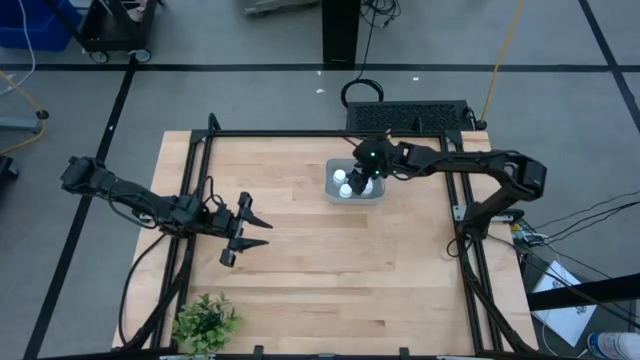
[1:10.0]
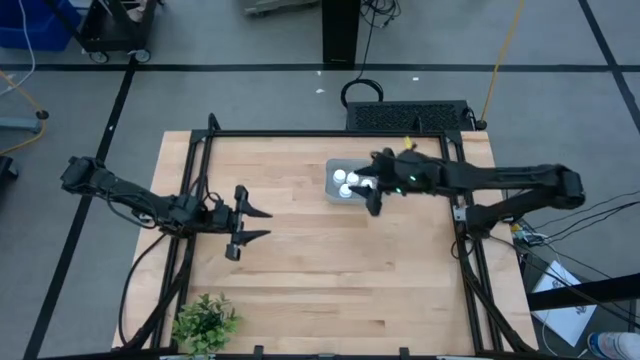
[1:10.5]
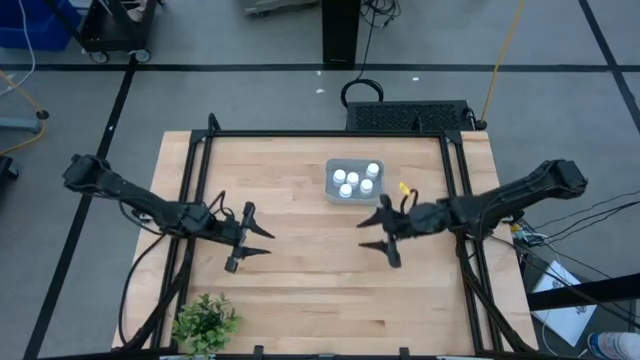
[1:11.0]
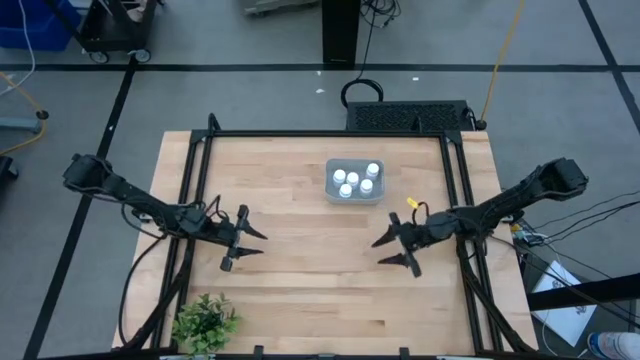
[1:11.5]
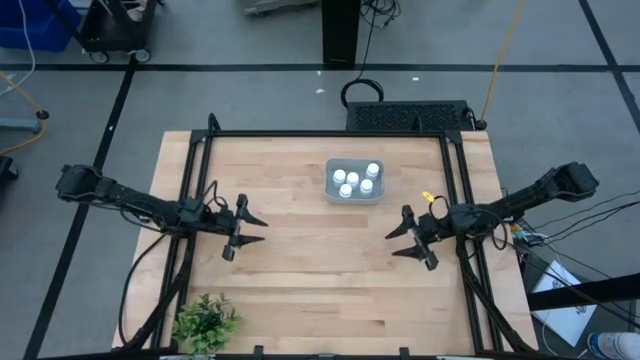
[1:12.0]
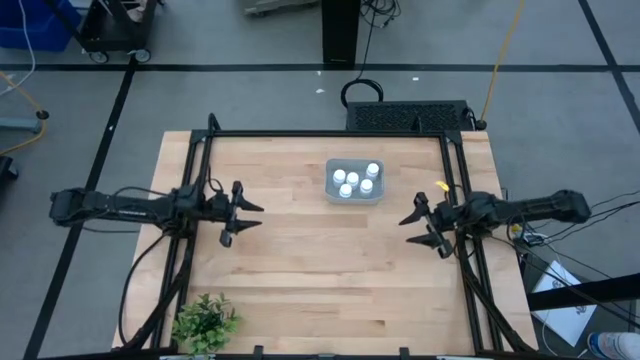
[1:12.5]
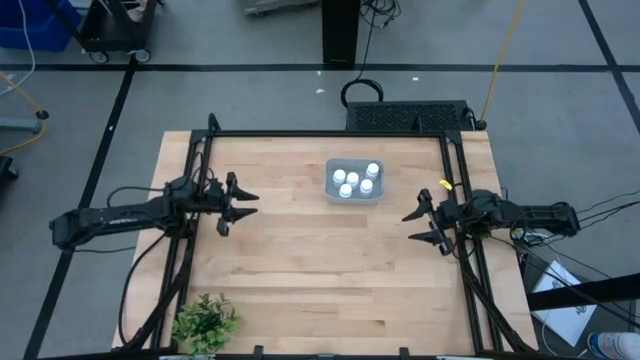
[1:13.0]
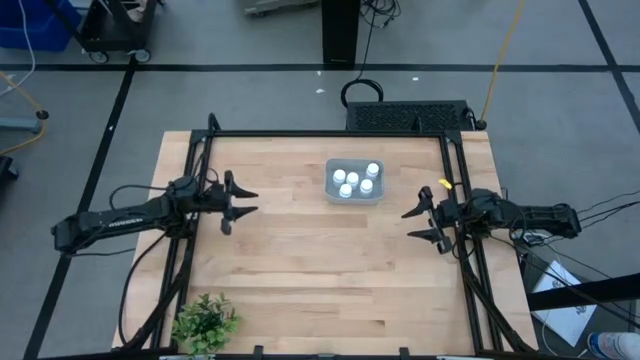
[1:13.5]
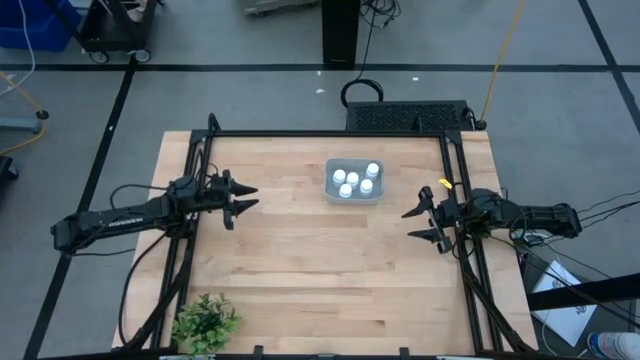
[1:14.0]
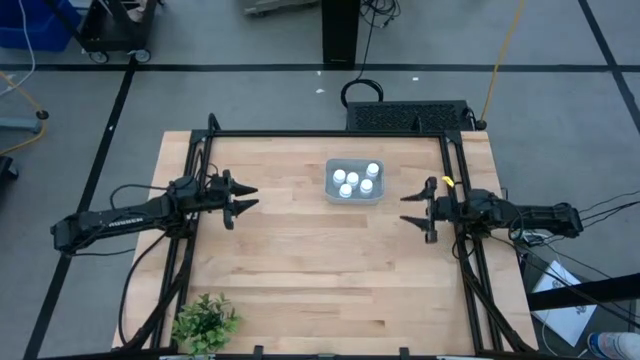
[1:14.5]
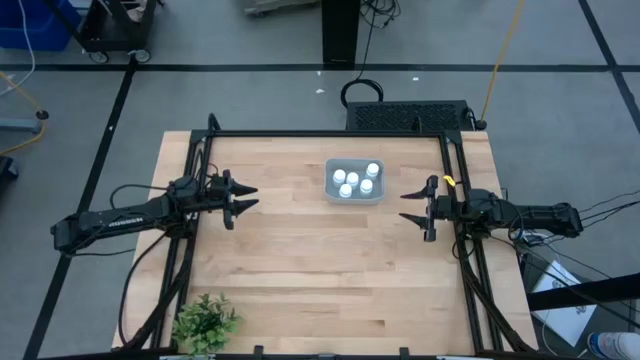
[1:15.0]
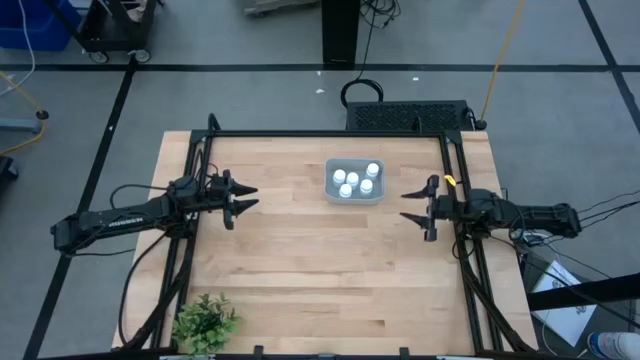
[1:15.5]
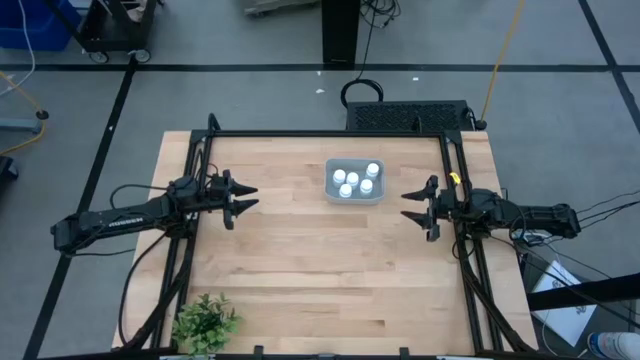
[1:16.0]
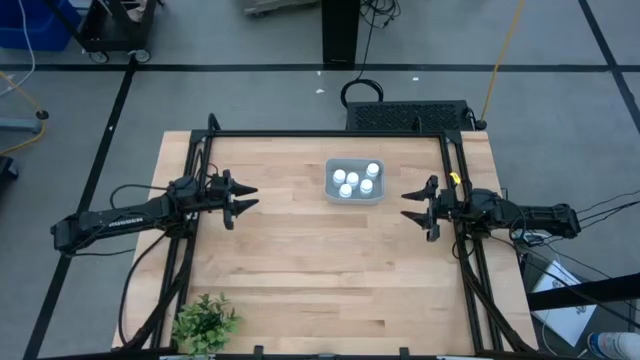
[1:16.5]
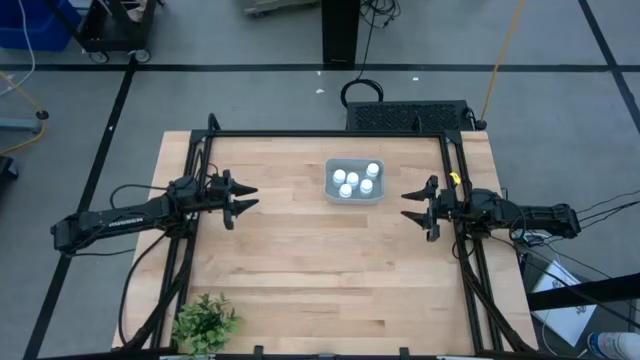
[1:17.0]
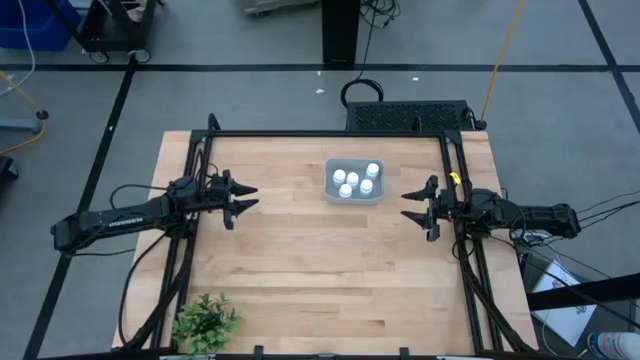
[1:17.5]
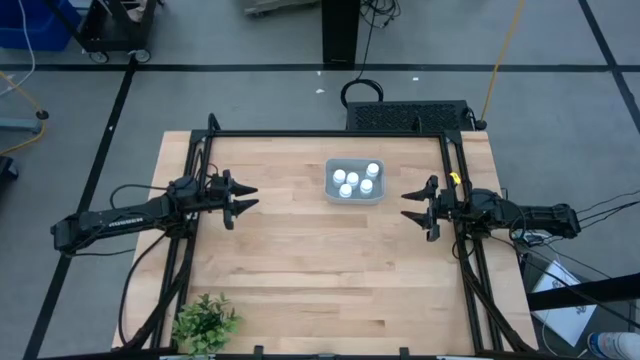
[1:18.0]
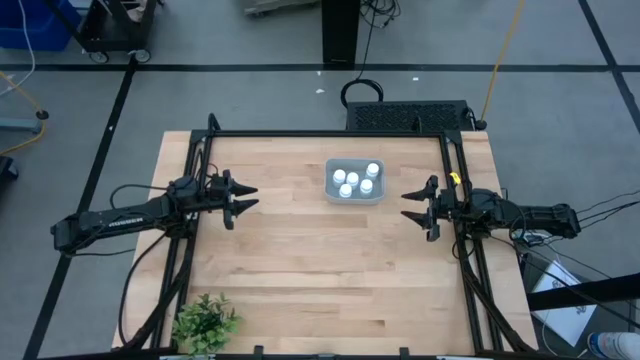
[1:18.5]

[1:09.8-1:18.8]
Task: Pick and place pill bottles into a basket
Return to Home Position

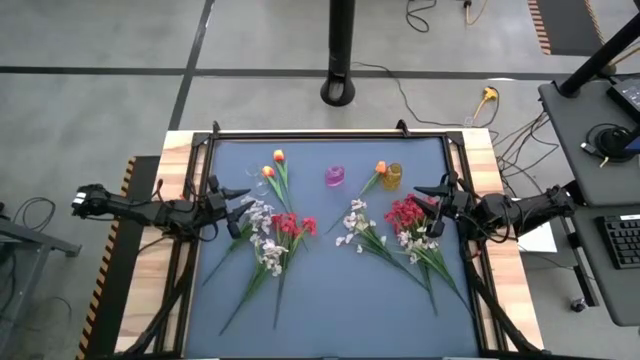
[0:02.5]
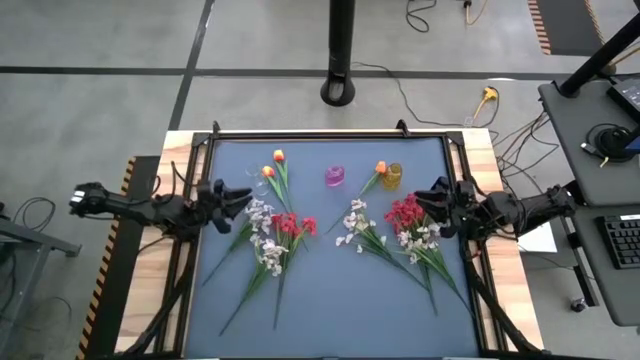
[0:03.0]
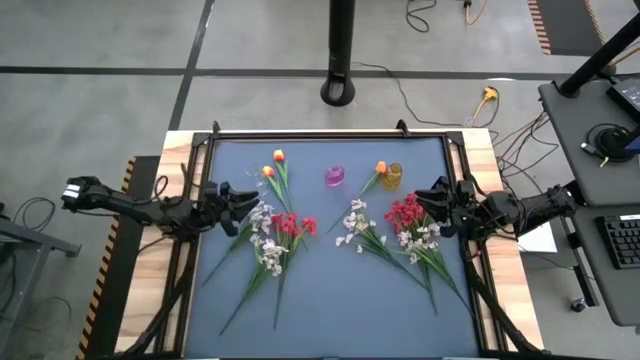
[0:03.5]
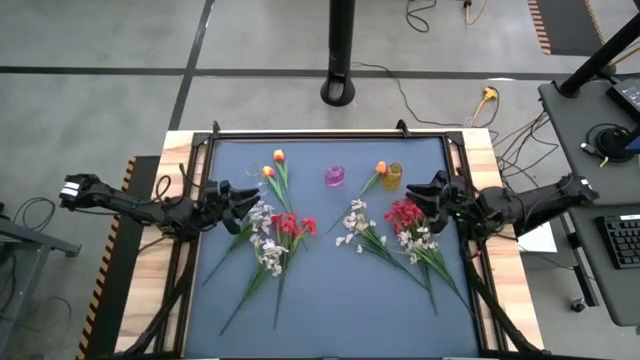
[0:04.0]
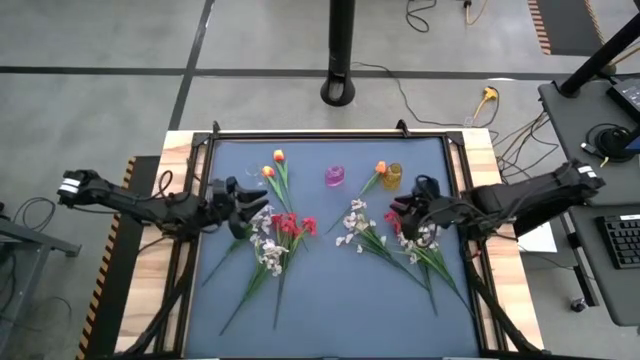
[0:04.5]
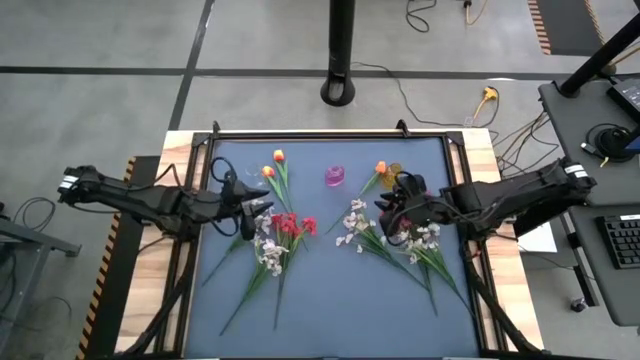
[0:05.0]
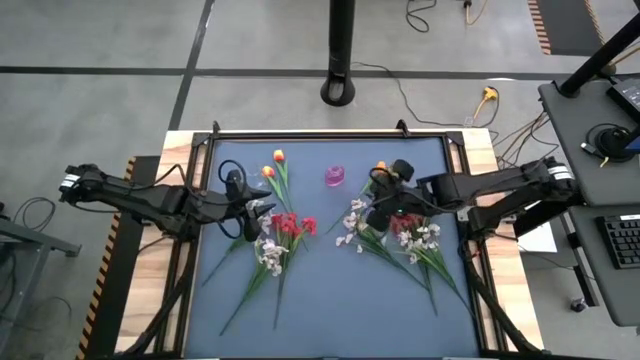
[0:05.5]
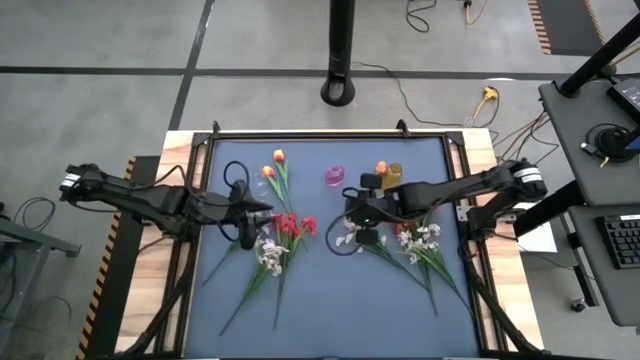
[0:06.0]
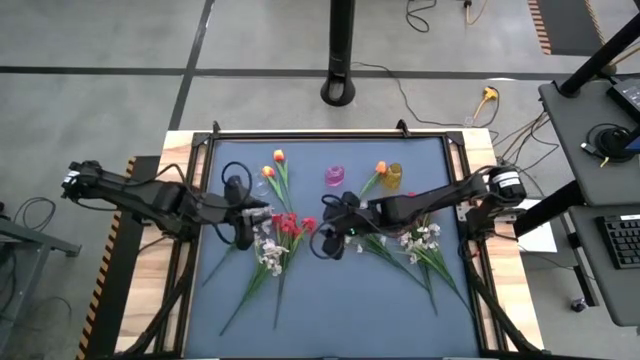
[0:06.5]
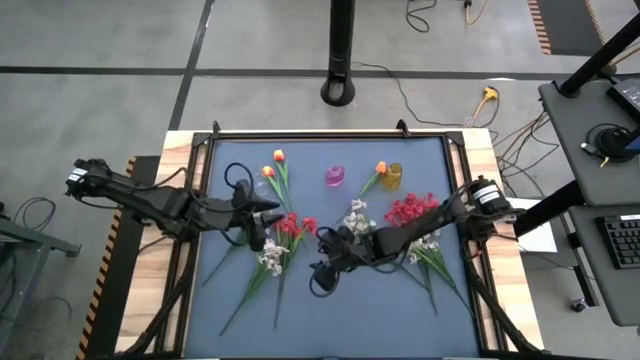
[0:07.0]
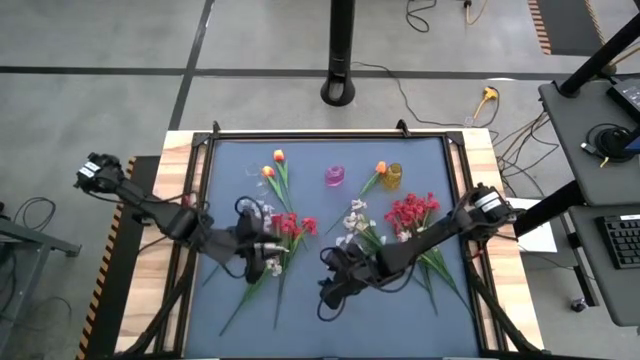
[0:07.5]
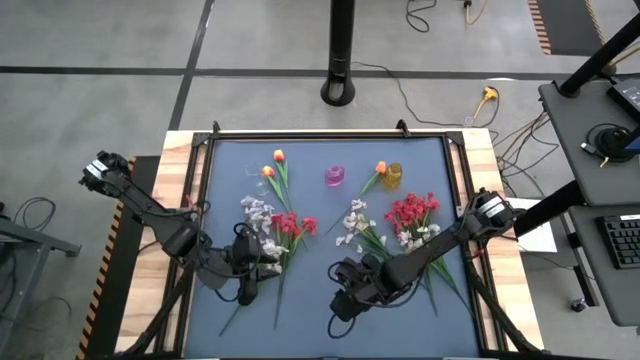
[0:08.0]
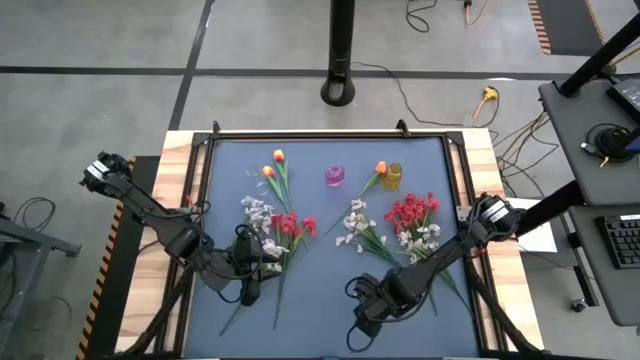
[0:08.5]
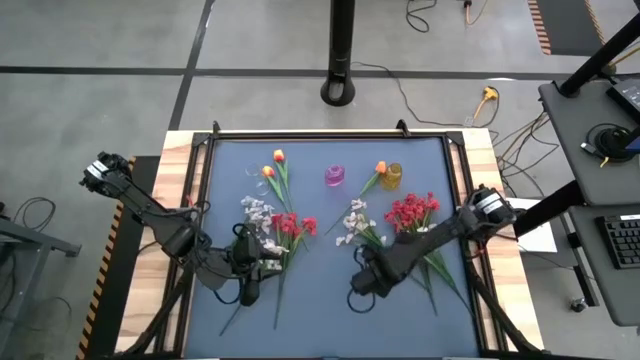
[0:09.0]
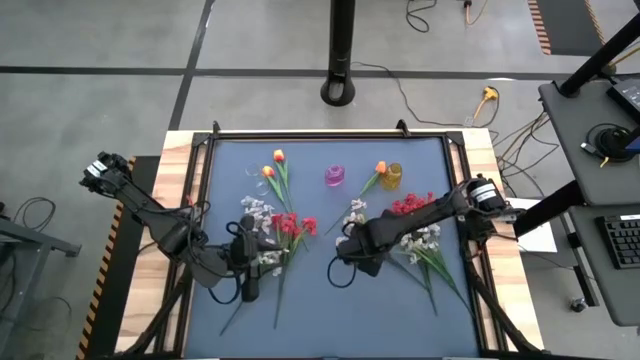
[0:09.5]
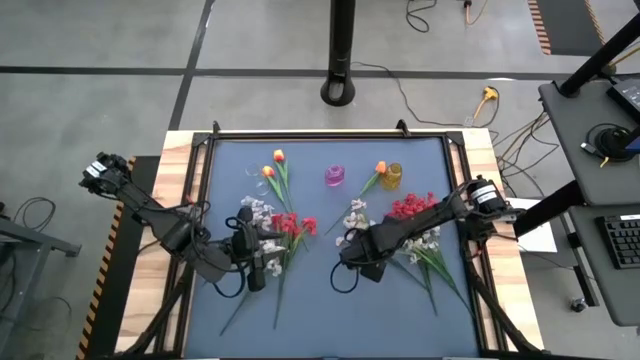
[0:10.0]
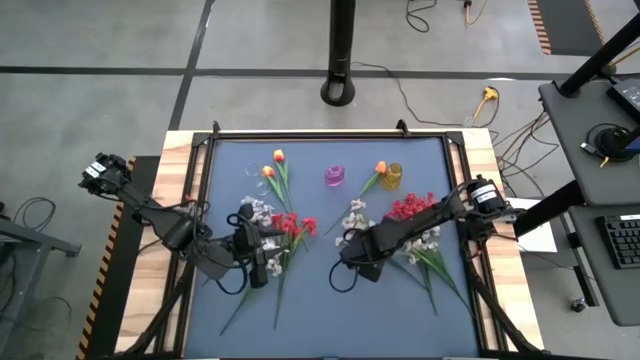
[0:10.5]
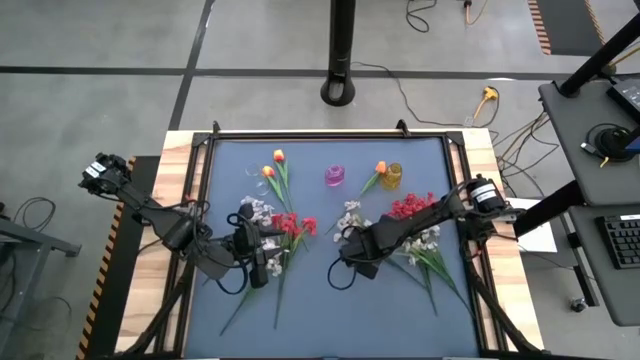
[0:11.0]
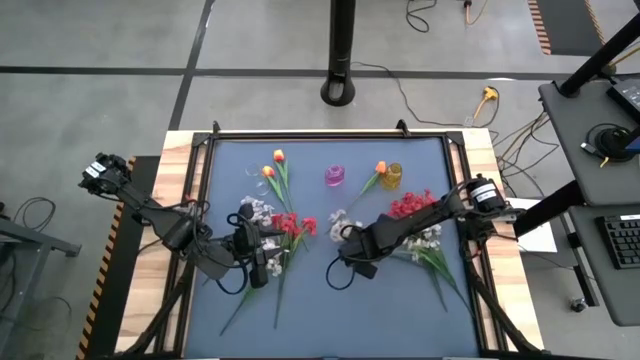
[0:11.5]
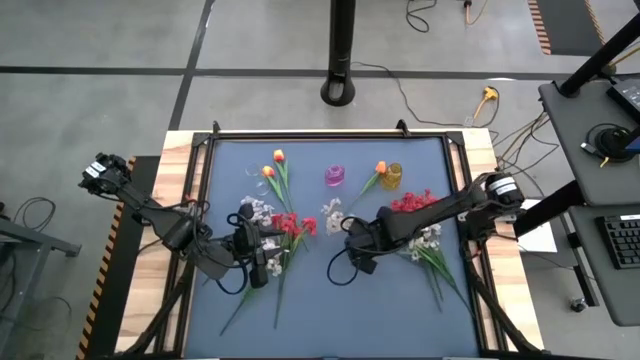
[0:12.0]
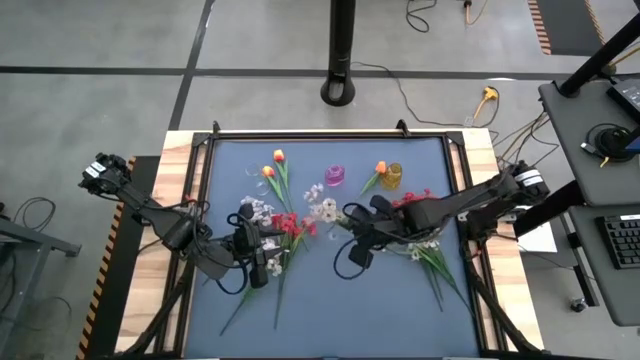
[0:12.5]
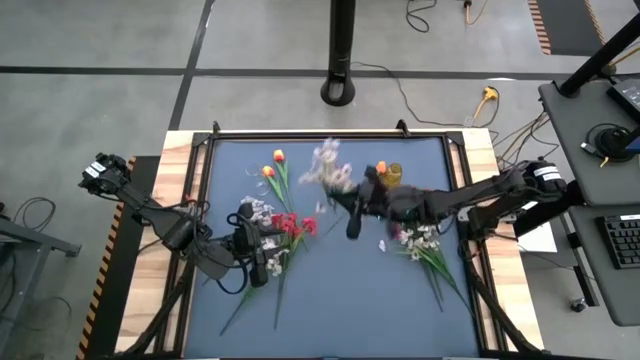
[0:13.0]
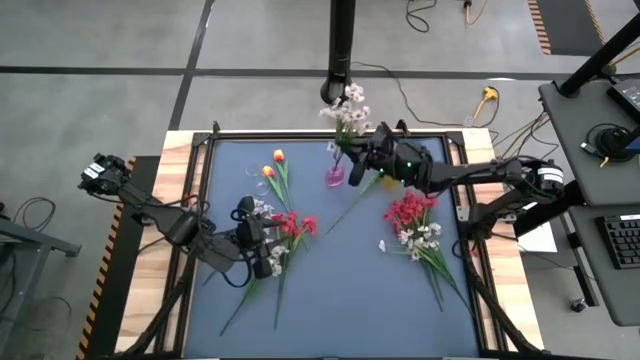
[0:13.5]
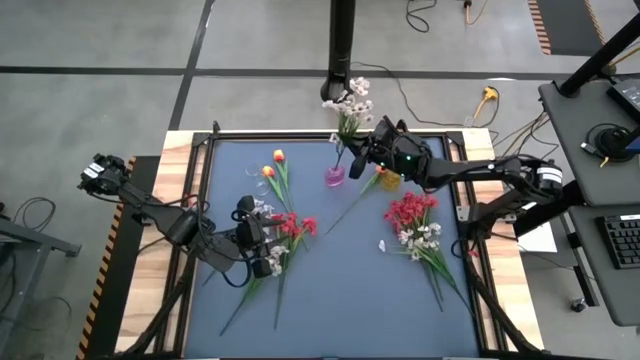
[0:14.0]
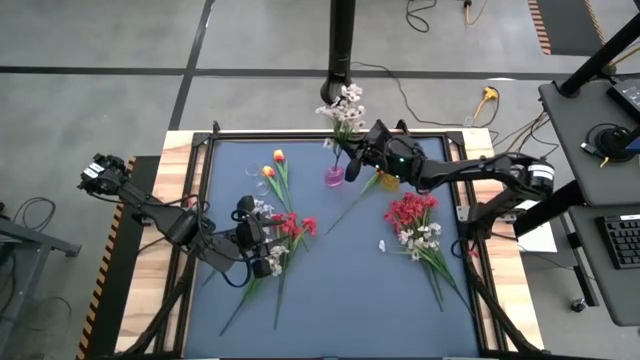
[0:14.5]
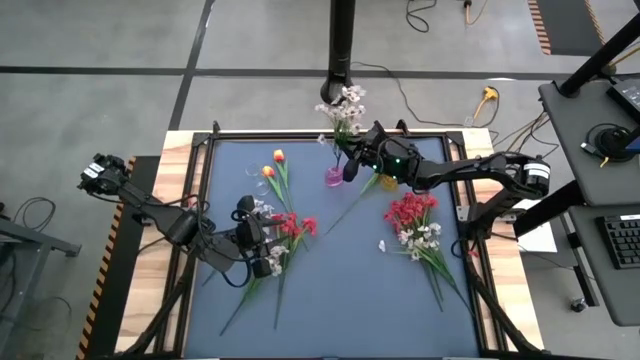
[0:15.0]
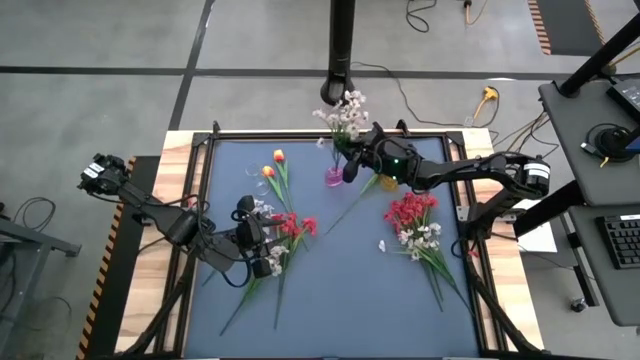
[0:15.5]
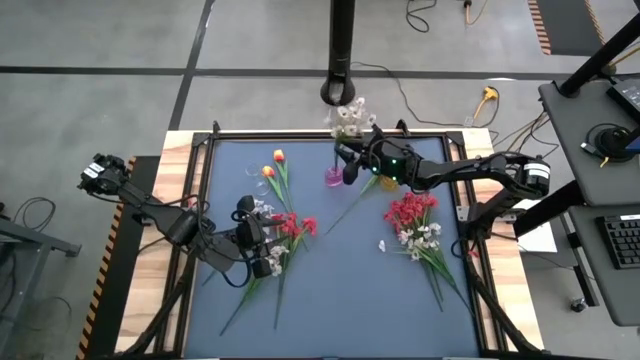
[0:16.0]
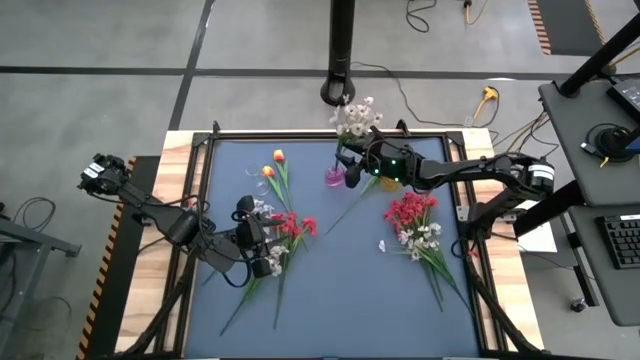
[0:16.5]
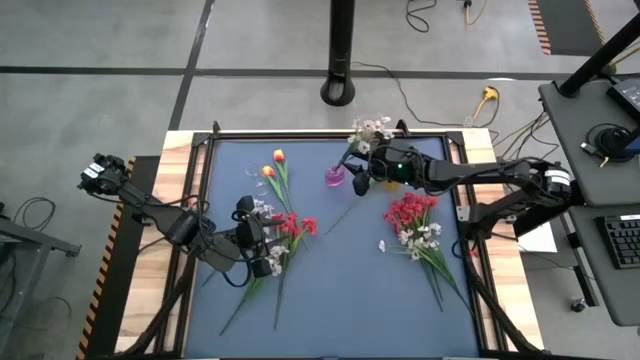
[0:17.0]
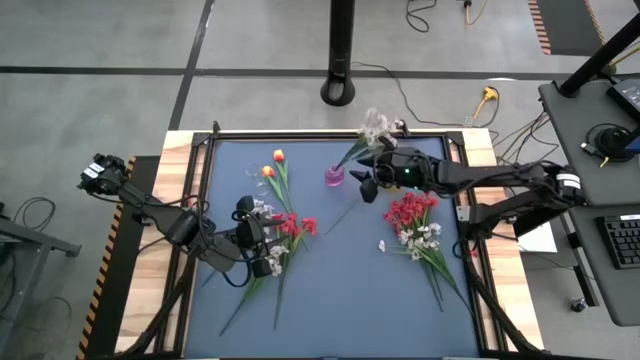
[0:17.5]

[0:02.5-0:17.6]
Task: Sort flowers into vase by color
Put the white flowers into the pink vase
